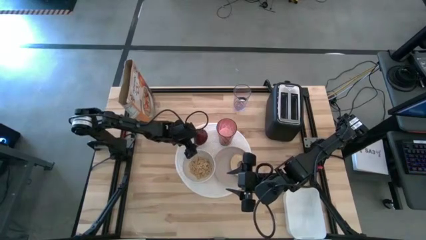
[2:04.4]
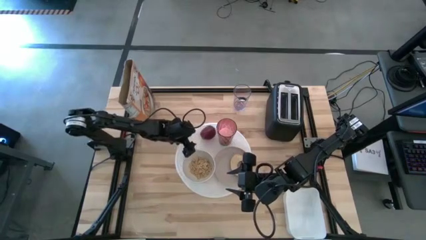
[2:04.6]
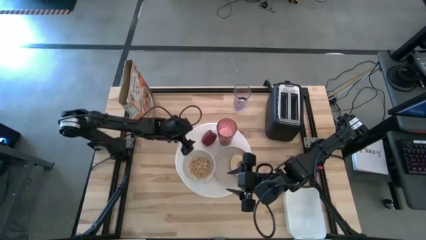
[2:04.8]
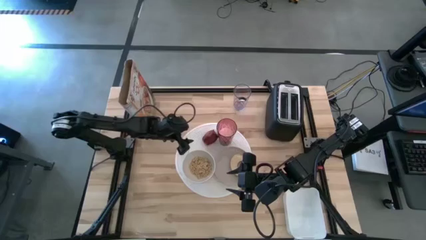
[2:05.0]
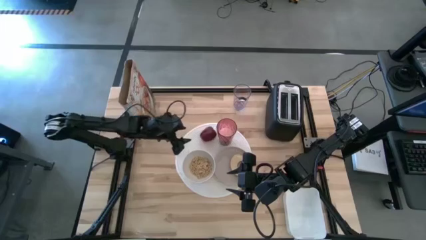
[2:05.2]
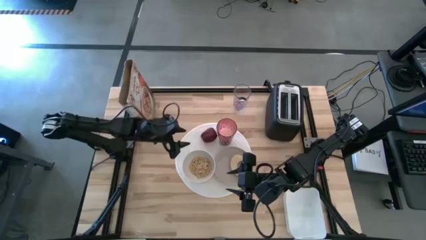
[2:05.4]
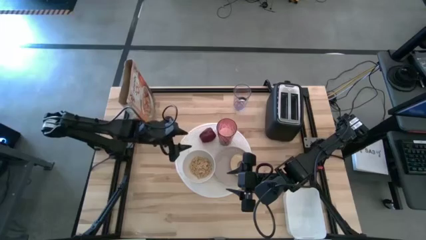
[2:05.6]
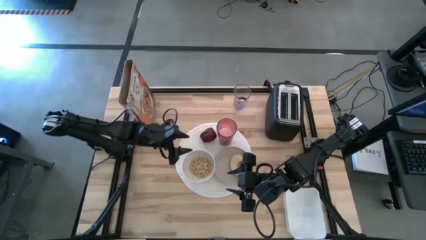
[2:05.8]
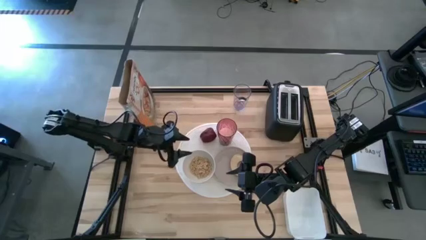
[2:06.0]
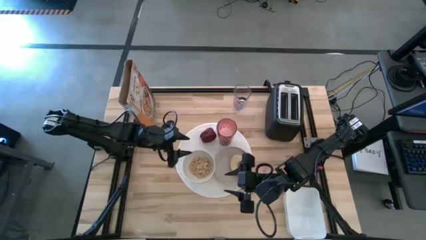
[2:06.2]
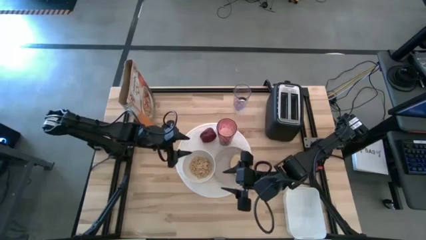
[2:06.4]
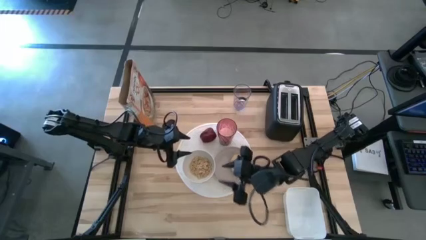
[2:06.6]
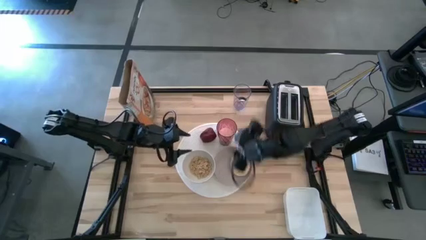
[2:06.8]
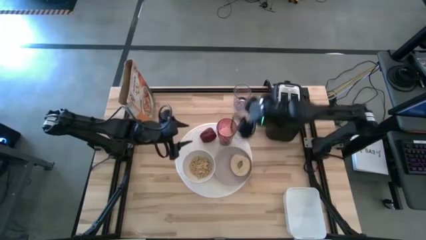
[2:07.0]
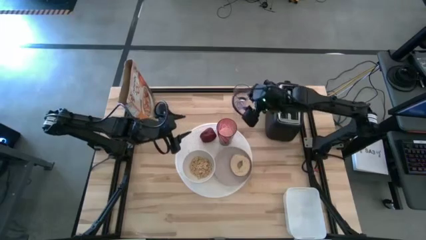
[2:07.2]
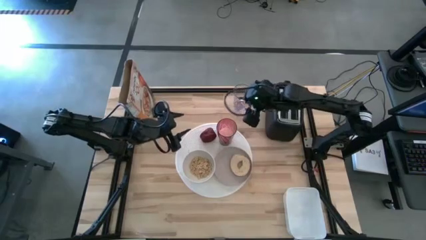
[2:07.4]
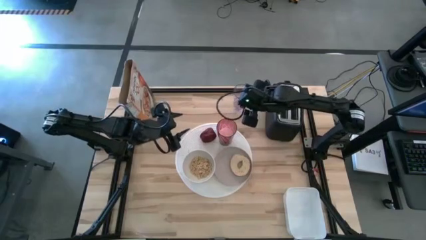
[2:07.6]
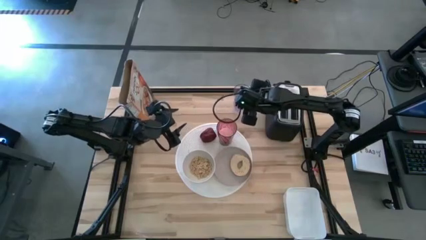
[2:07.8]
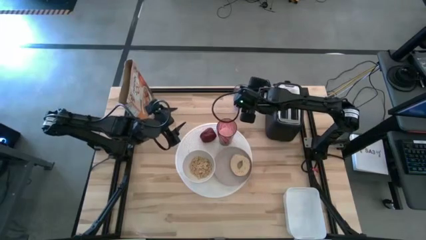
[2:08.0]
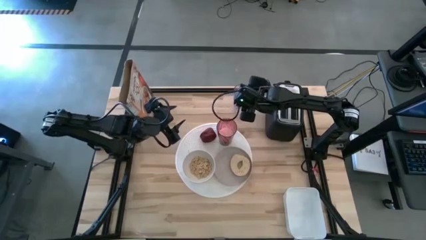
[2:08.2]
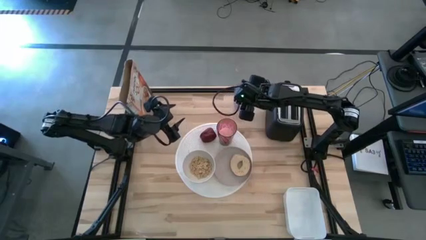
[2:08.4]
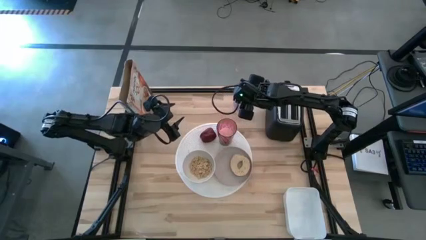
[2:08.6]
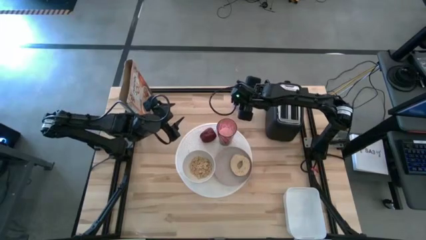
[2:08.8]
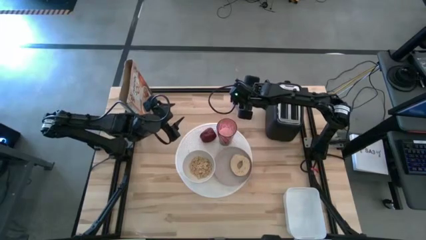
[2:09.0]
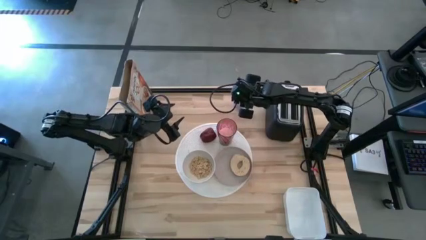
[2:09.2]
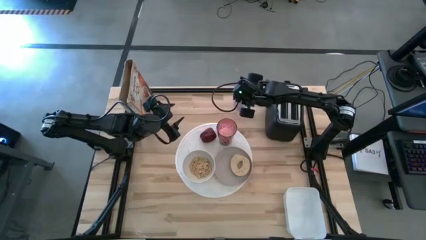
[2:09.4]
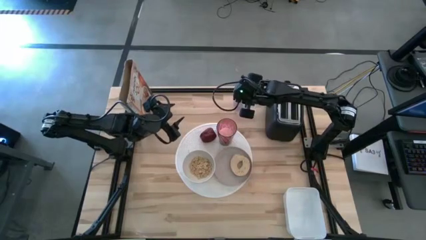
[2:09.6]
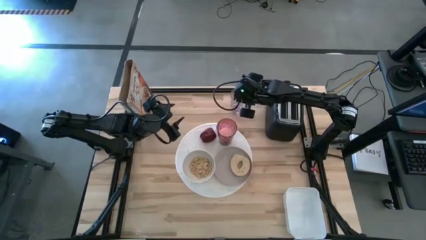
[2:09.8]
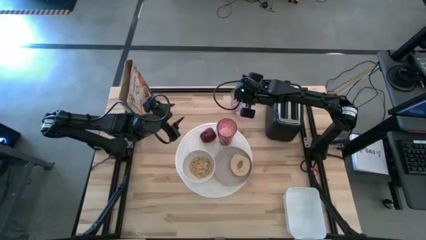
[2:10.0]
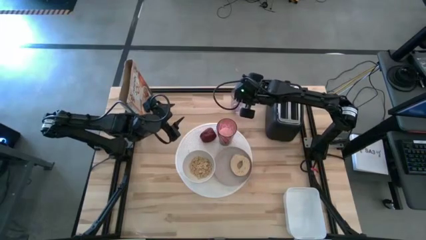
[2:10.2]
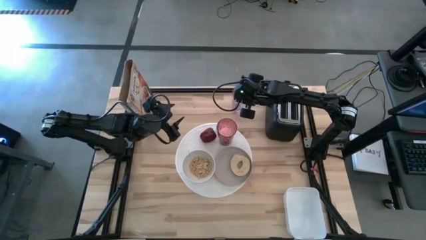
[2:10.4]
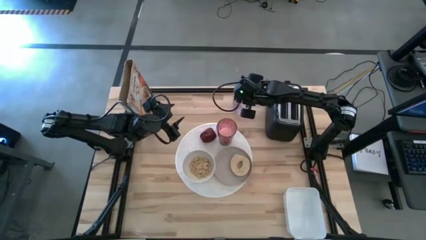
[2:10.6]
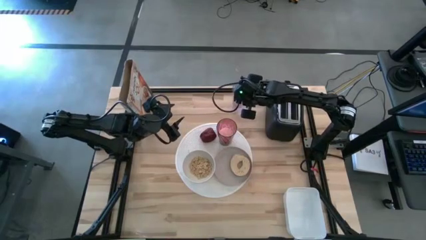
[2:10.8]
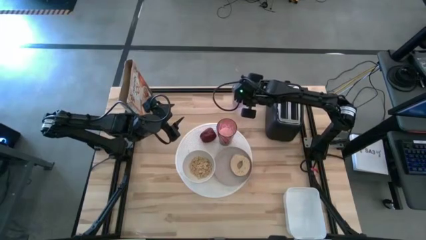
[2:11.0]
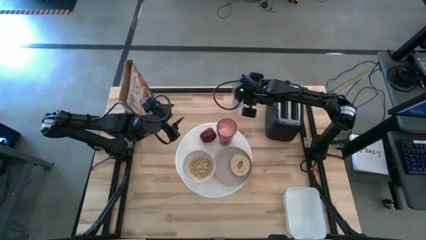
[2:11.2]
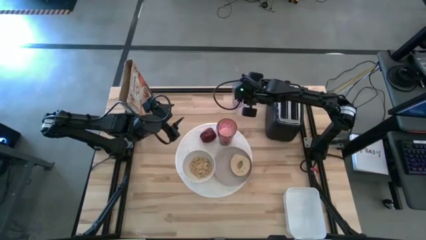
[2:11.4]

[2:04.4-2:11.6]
Task: Arrange a breakfast setting
Put the silver spoon on the white table mat to the left of the white bowl

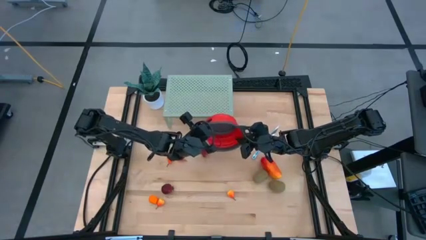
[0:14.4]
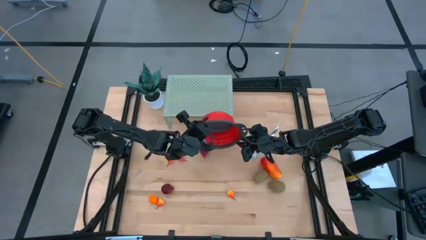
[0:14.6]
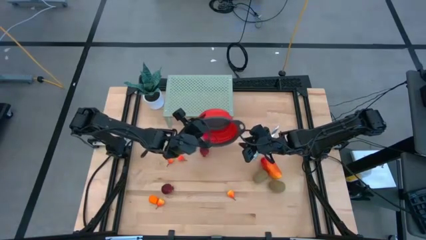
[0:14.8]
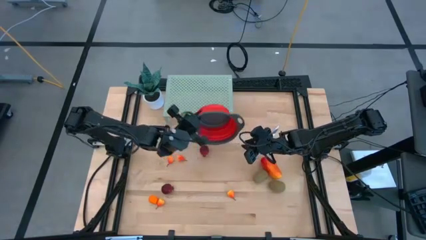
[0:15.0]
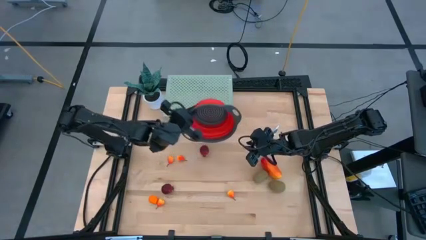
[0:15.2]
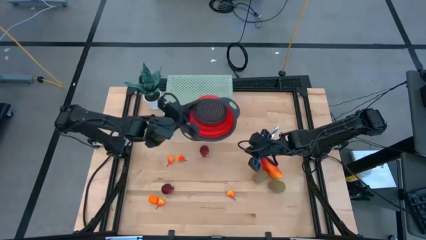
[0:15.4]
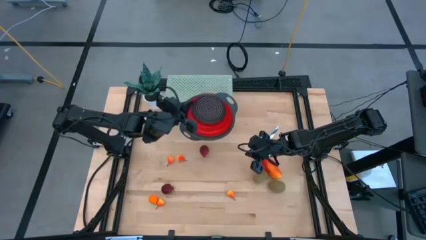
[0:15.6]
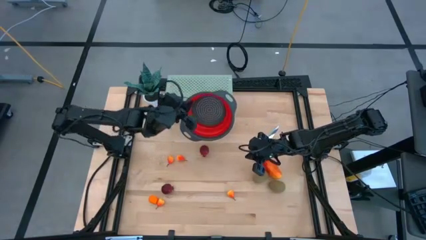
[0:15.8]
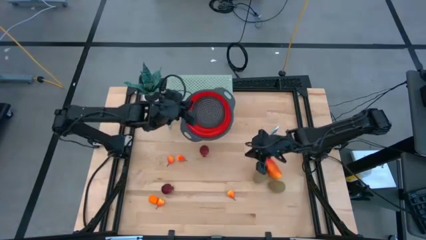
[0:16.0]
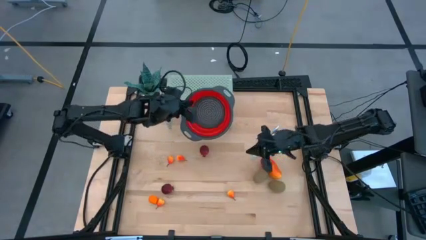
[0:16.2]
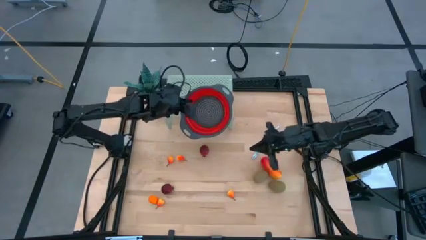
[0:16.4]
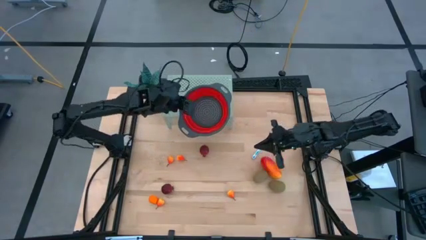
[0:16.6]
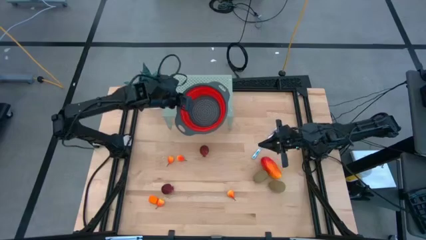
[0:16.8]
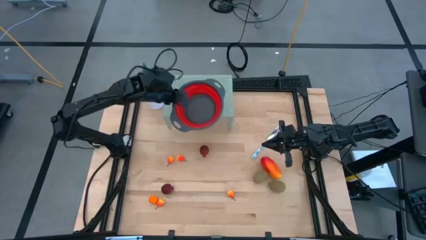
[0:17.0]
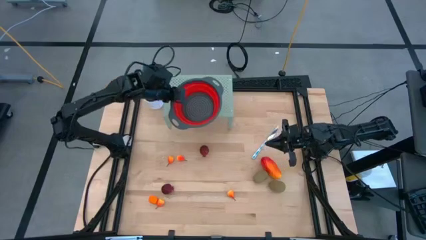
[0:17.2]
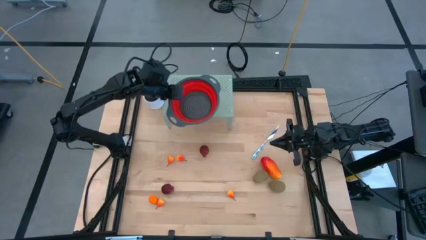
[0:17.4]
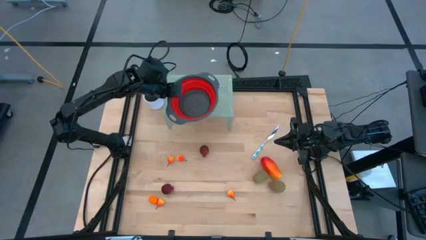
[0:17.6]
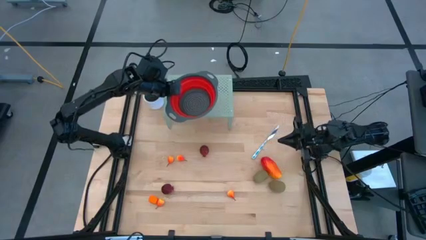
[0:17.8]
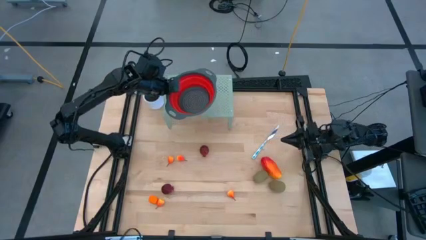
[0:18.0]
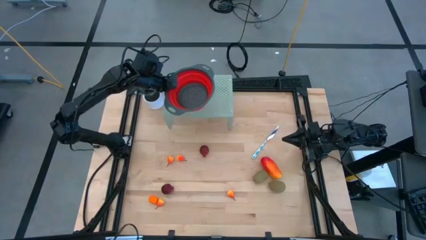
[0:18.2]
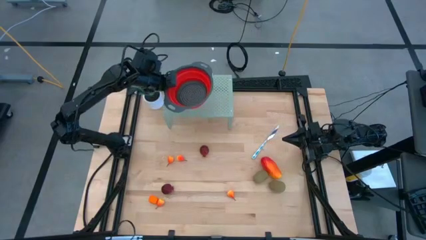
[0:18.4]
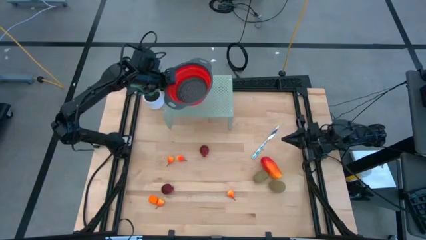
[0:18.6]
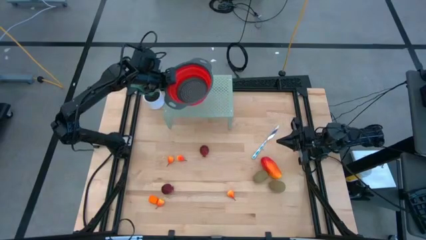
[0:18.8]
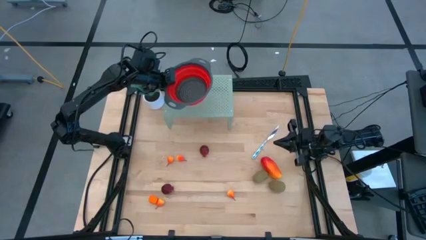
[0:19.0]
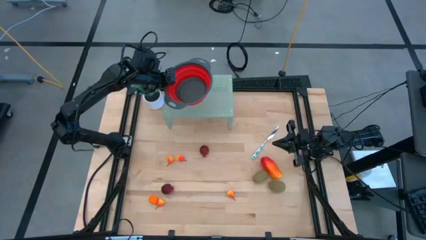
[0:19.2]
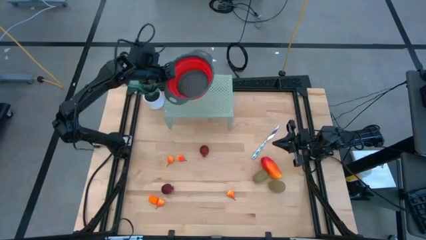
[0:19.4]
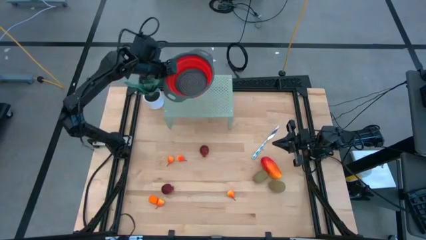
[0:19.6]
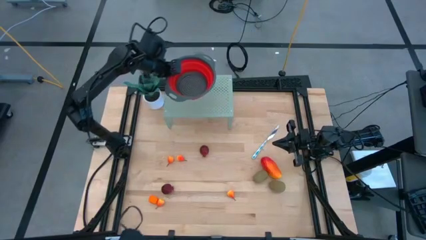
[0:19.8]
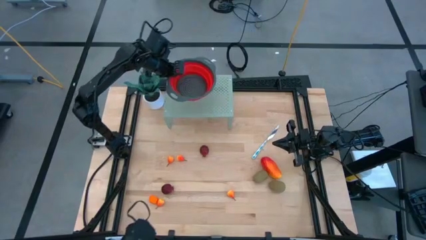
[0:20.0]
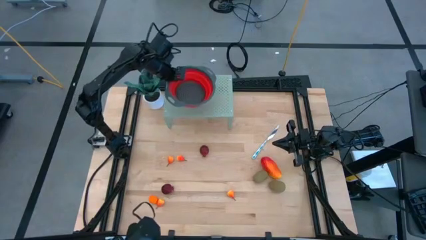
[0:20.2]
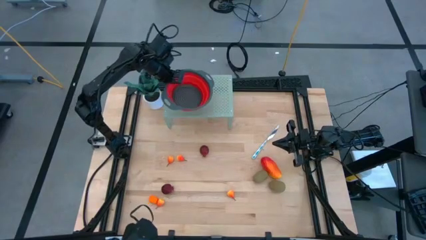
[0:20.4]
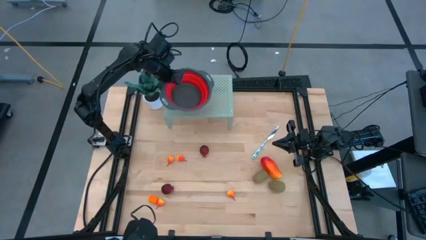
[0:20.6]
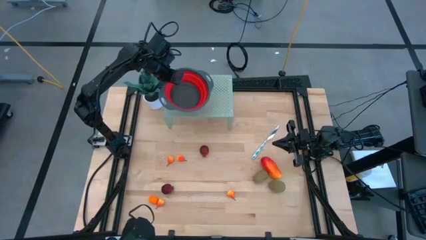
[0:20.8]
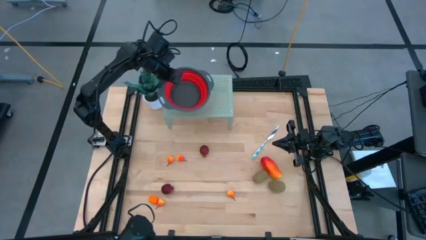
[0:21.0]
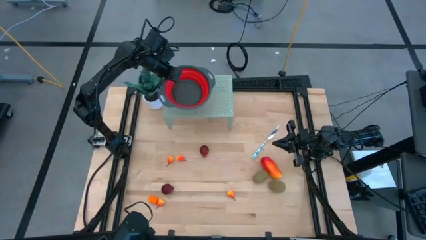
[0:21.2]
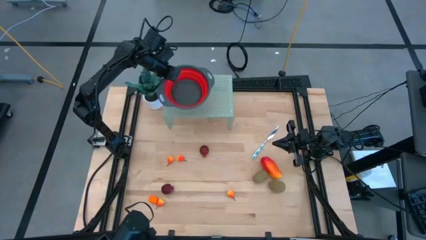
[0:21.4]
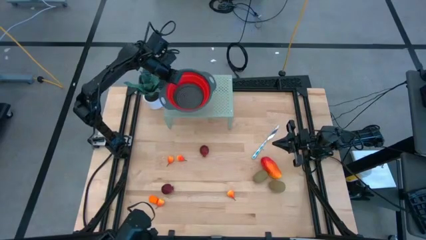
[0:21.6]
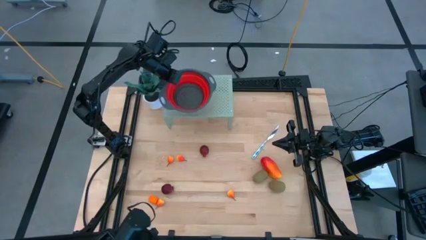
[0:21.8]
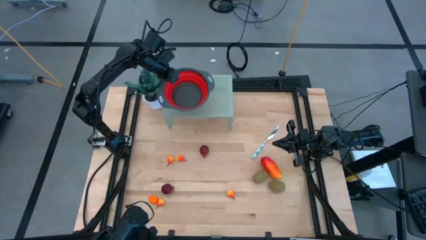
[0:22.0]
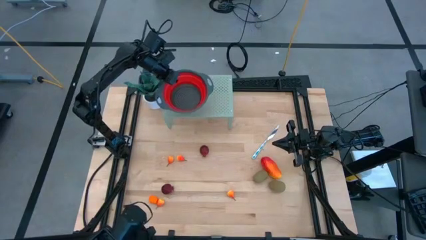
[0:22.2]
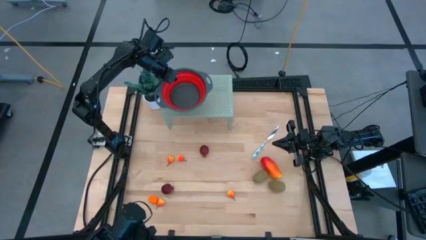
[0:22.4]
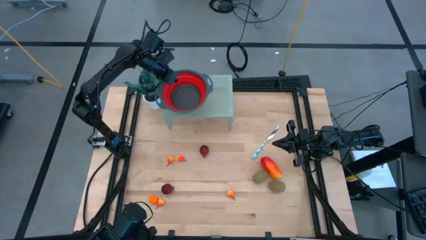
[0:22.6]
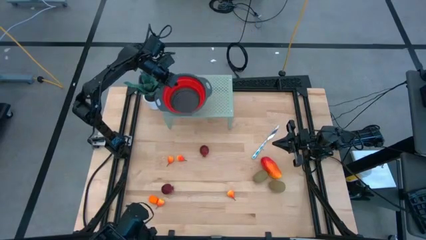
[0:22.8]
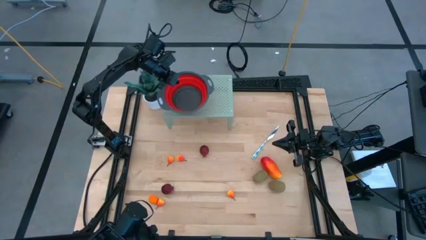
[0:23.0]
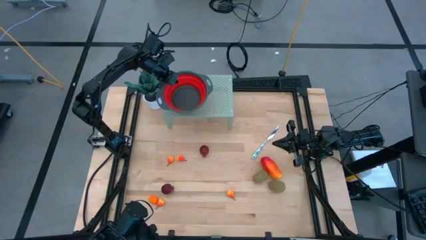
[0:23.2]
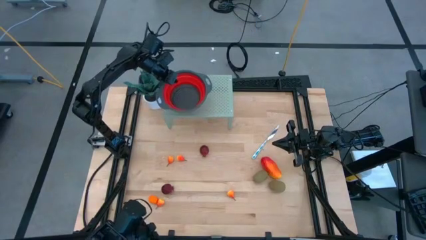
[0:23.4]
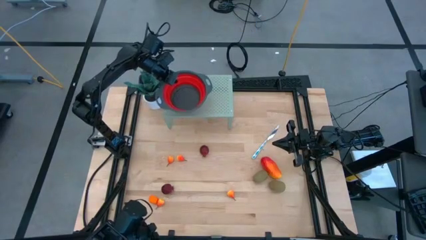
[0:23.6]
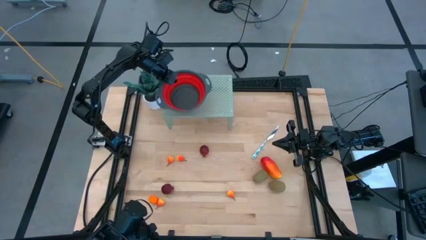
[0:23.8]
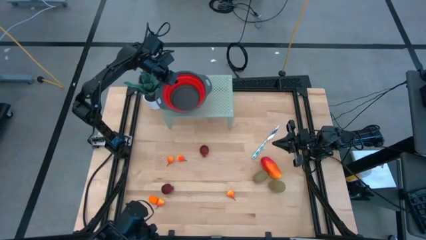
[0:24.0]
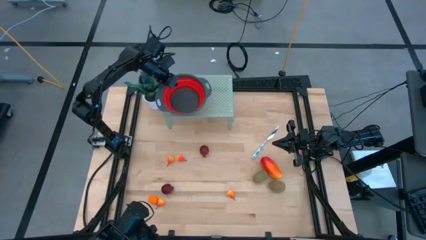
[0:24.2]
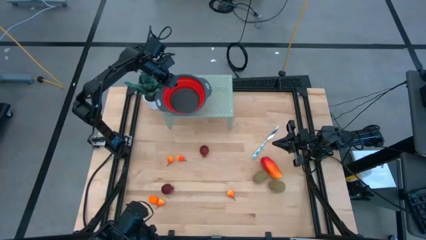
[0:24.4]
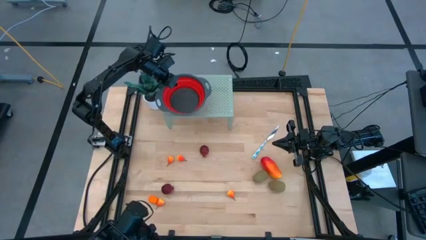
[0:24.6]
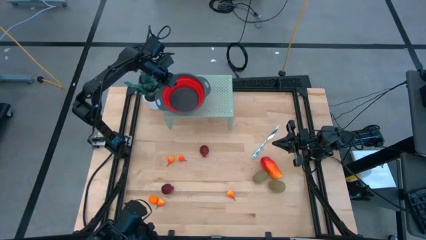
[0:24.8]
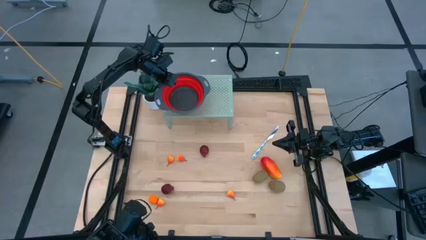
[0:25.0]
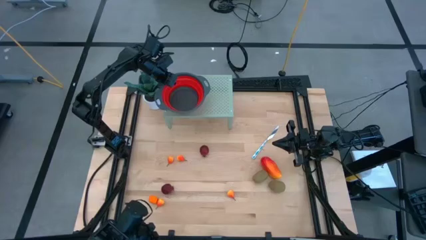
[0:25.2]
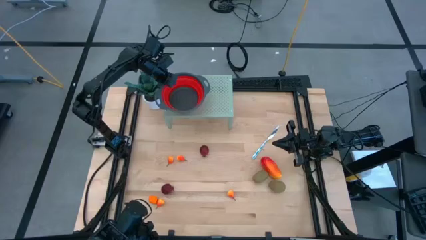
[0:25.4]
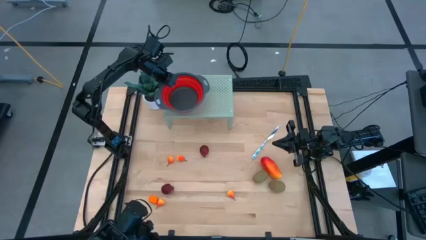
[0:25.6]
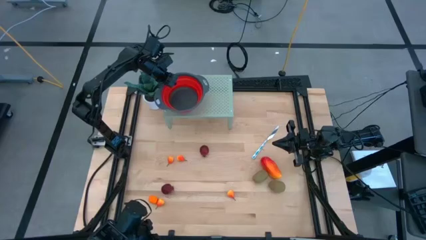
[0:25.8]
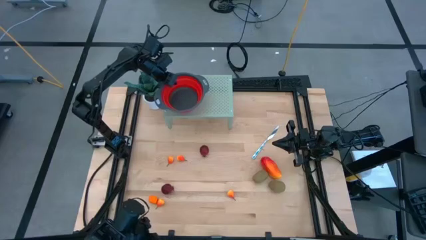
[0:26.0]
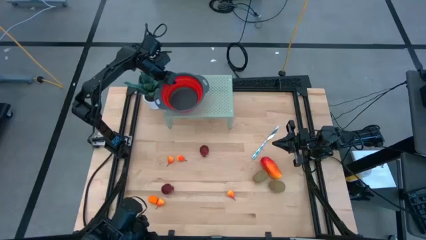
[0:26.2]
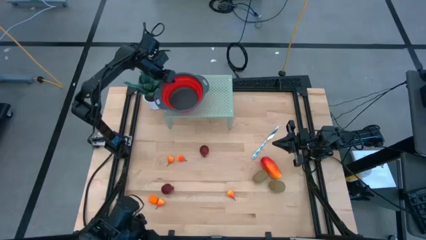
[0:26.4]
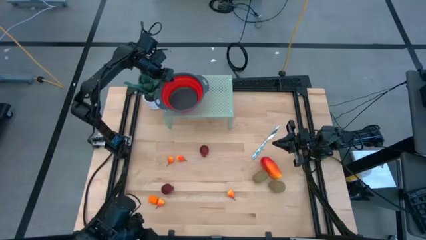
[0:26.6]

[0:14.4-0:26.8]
Task: Pick & Place Fruit
Put the red strainer bowl on the shelf
